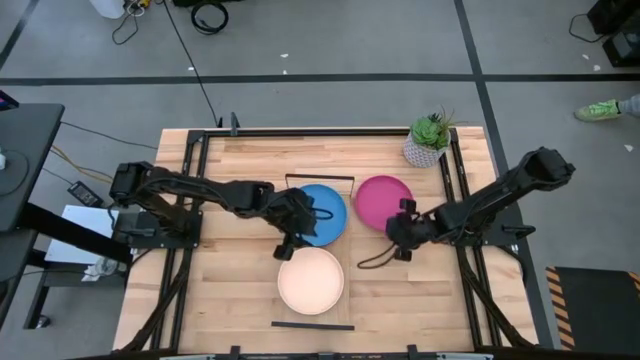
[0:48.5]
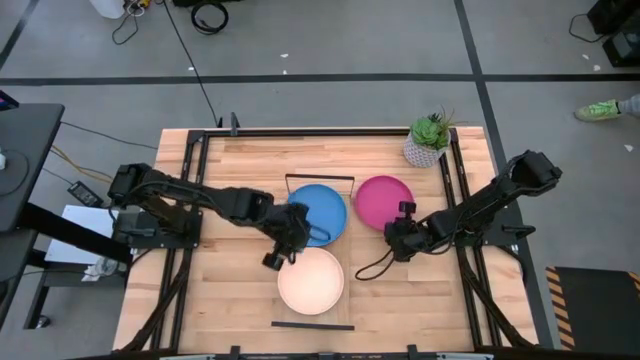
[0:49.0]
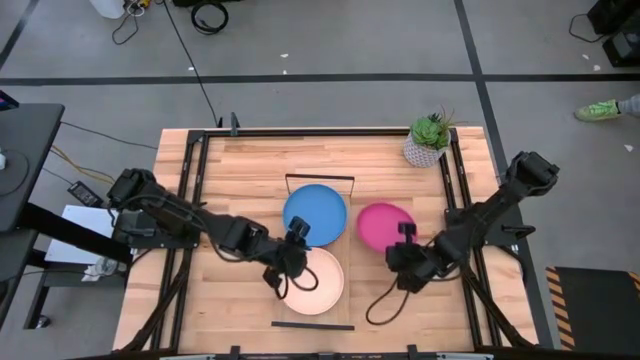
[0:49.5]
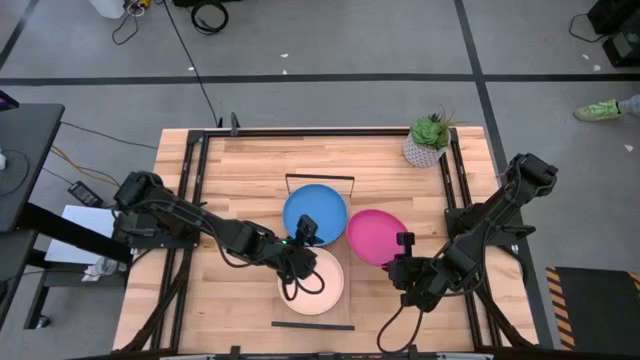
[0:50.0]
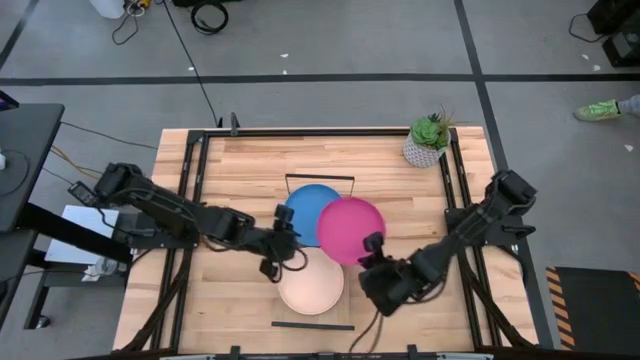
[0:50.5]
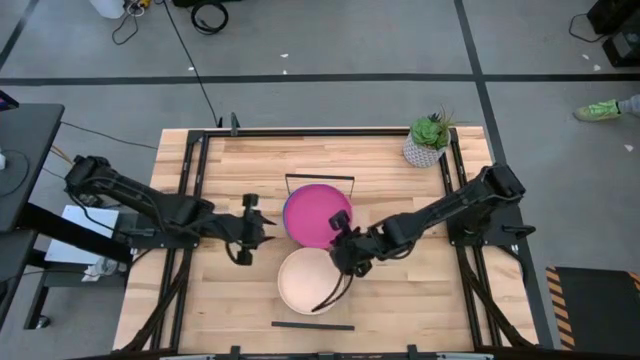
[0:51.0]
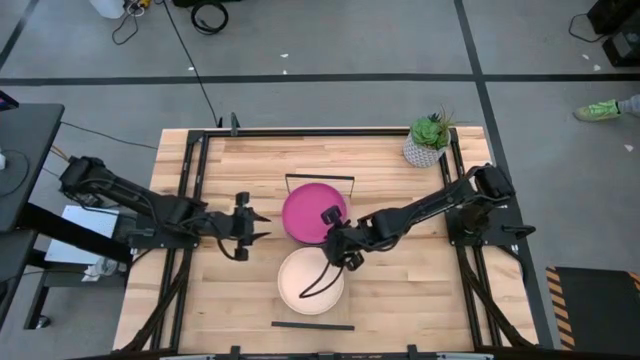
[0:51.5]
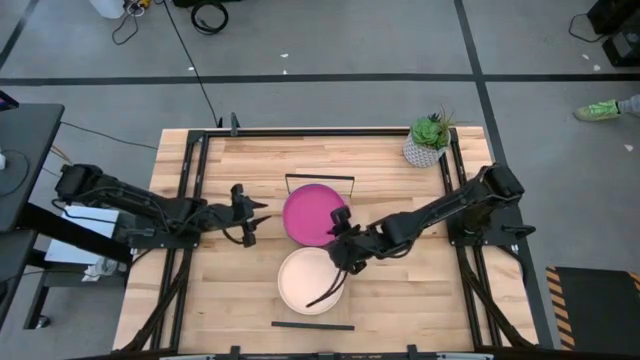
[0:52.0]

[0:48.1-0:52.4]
Task: Place and stack plates onto a shelf
Stack the pink plate on top of the light blue plate on the shelf

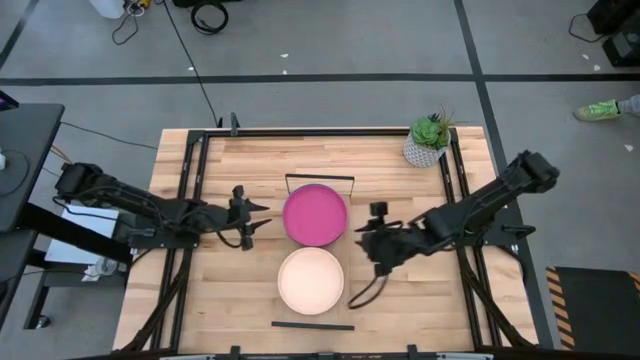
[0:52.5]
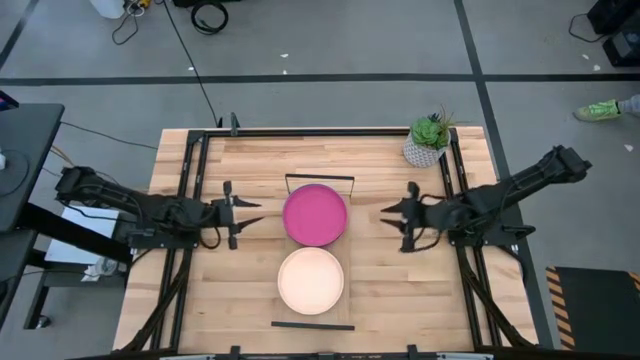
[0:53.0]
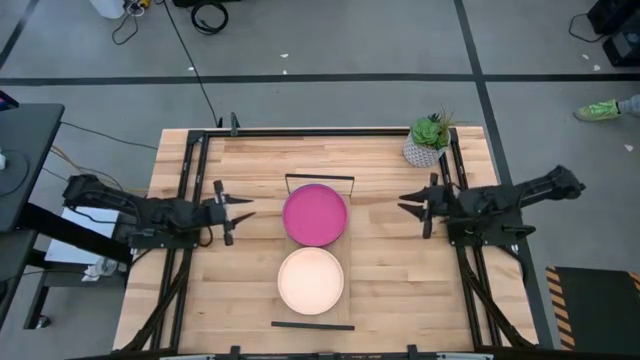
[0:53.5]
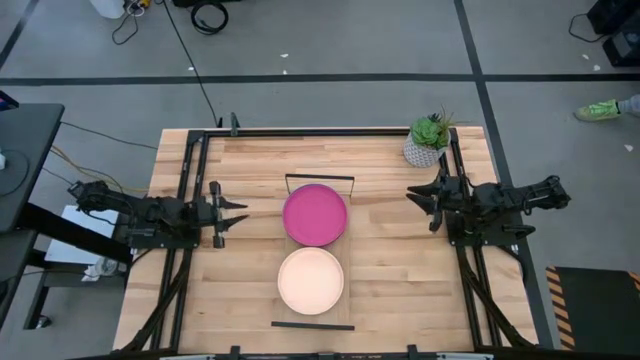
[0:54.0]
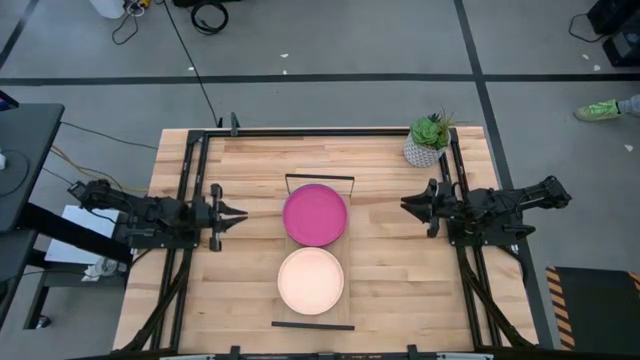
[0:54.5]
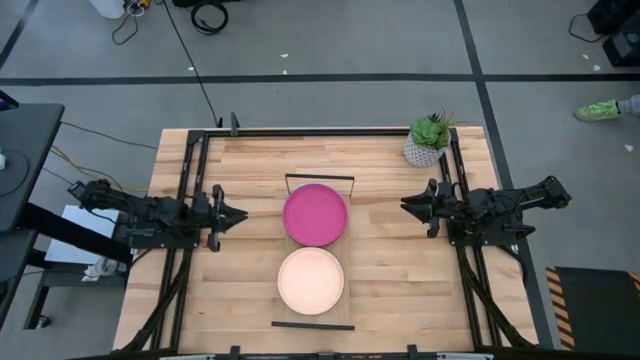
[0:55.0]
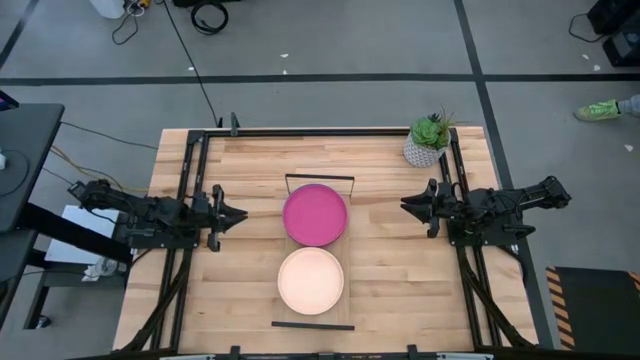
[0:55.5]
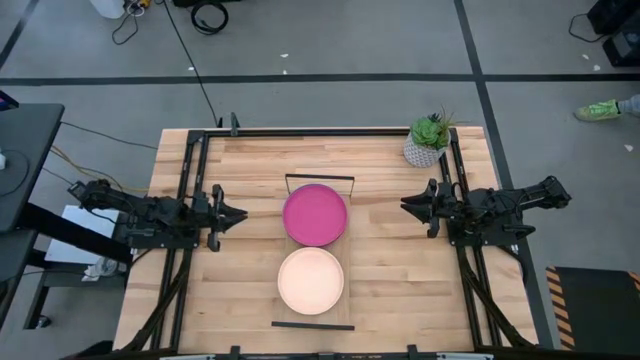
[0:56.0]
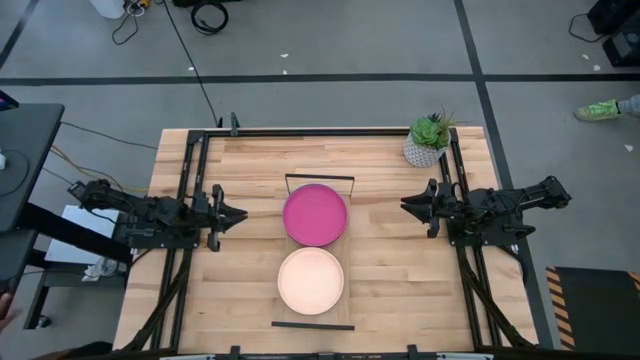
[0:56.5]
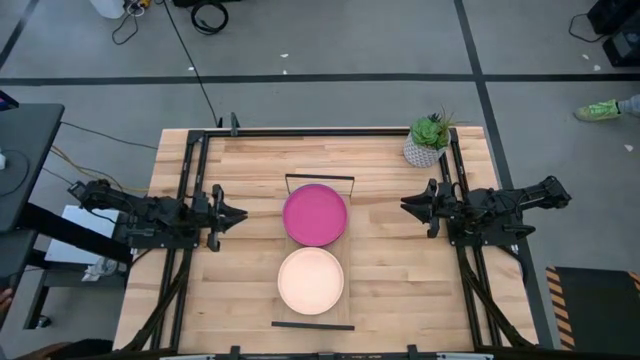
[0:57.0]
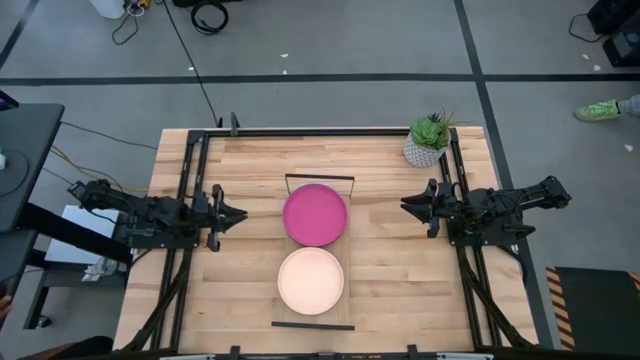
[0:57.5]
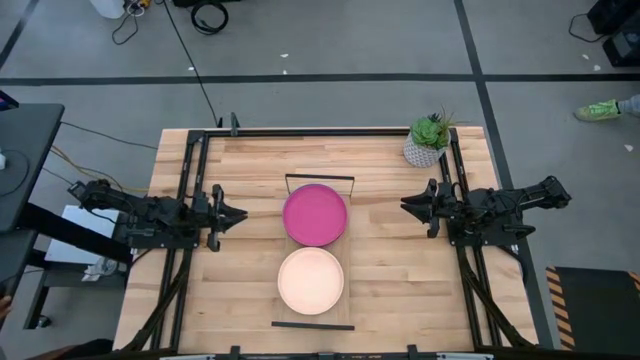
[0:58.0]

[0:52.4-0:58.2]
Return to Home Position

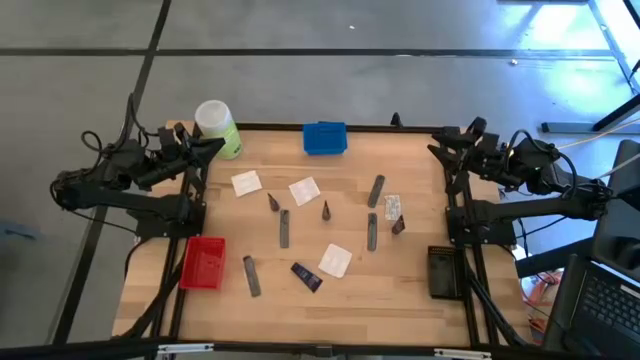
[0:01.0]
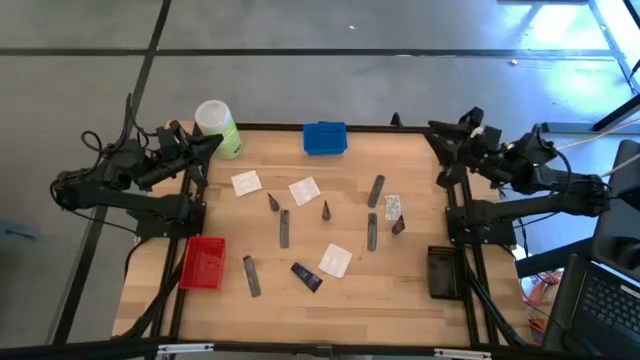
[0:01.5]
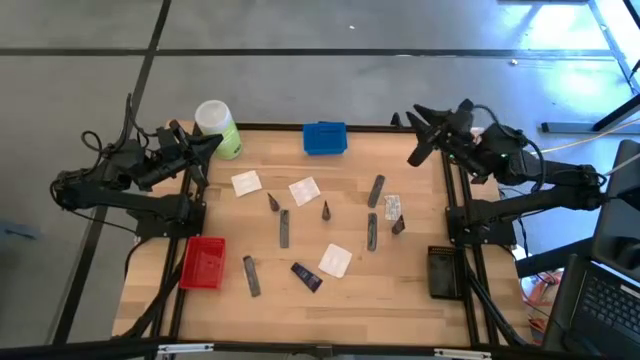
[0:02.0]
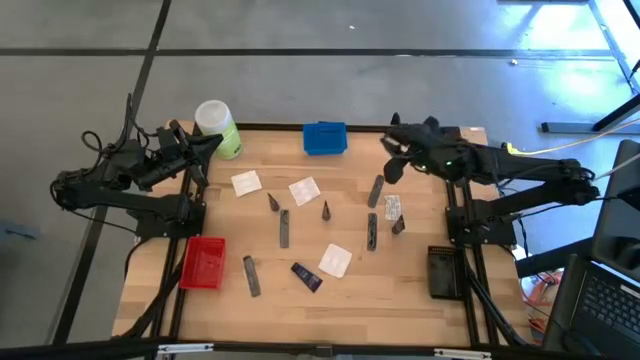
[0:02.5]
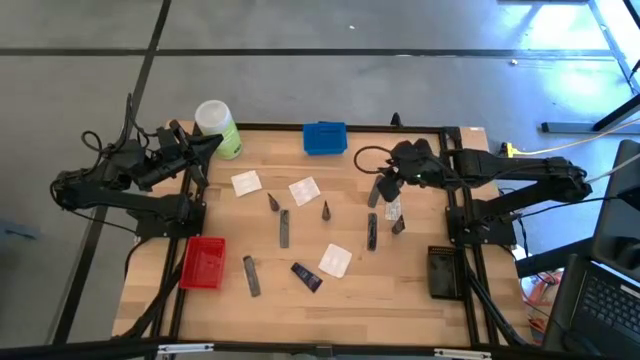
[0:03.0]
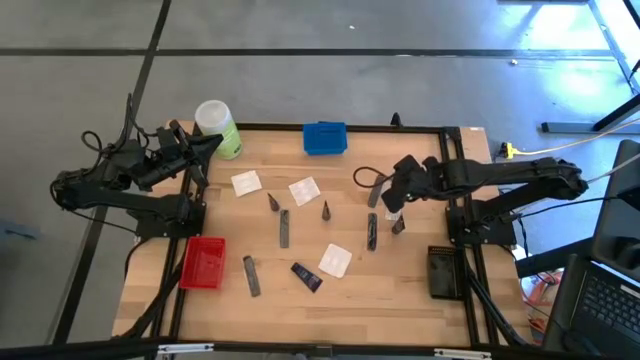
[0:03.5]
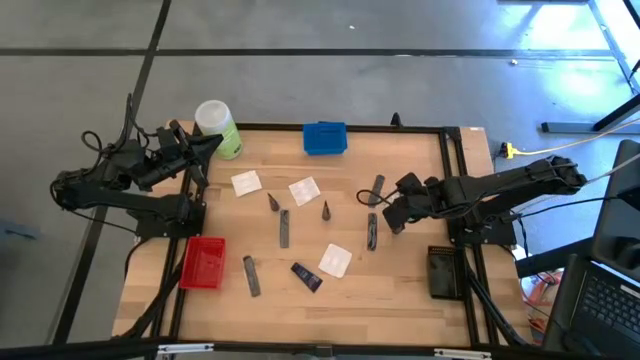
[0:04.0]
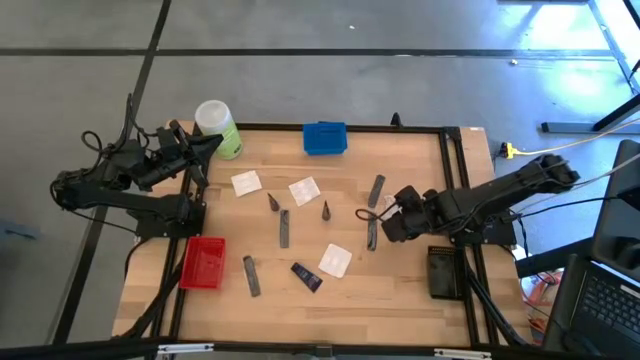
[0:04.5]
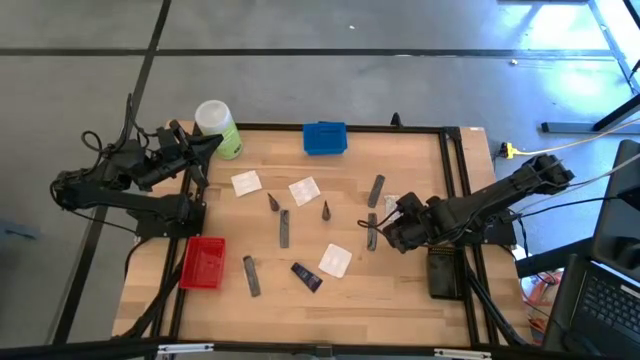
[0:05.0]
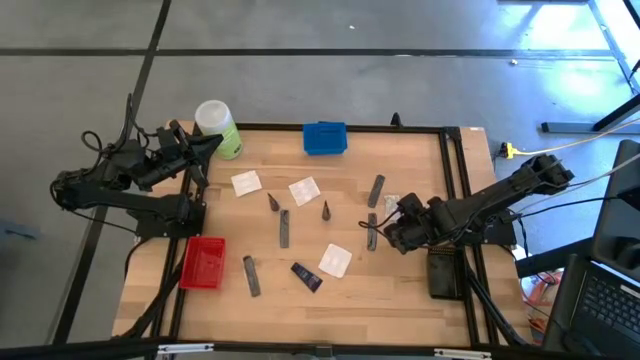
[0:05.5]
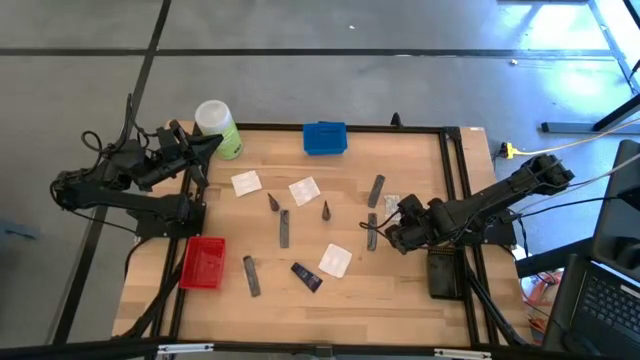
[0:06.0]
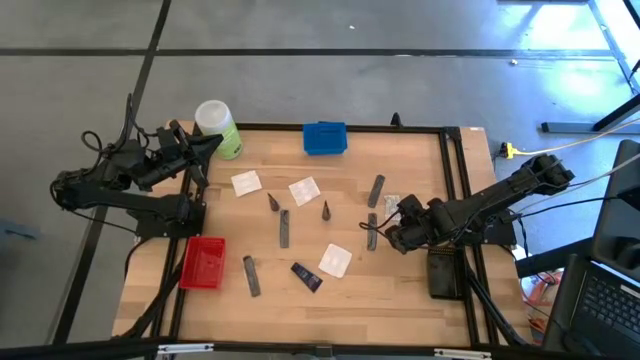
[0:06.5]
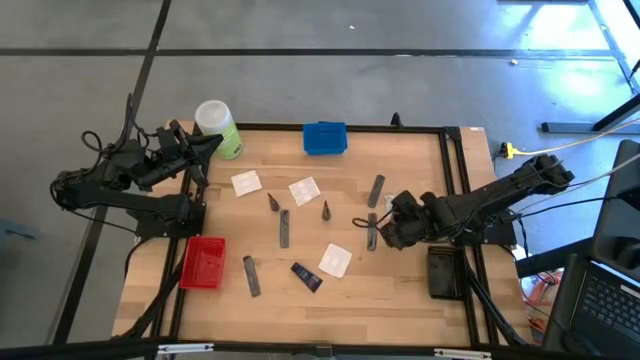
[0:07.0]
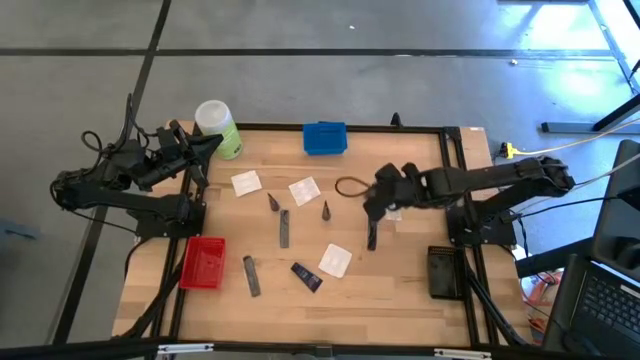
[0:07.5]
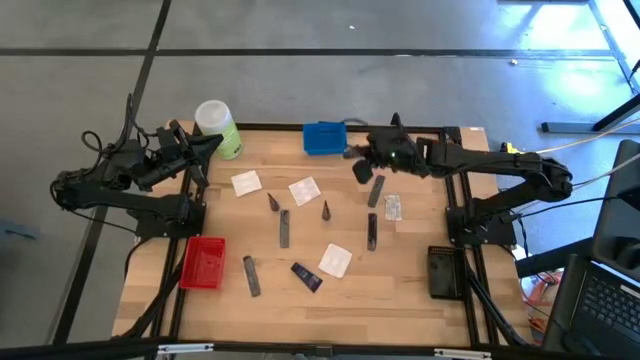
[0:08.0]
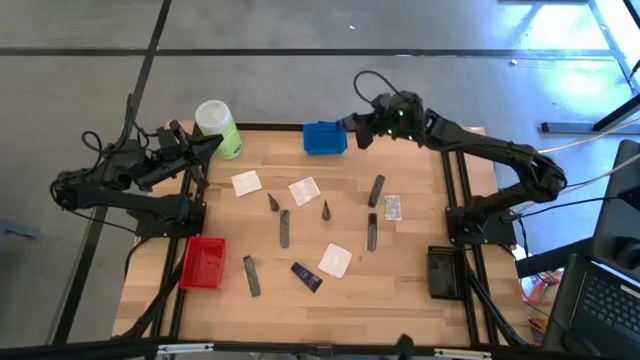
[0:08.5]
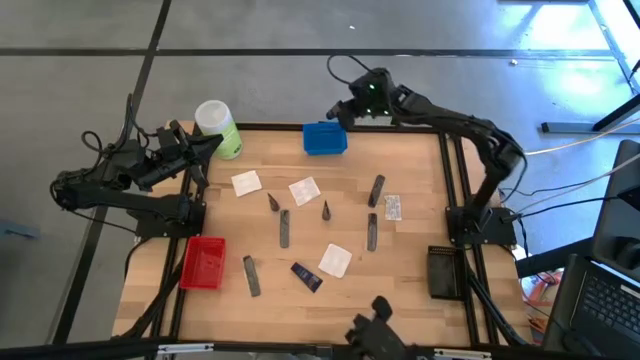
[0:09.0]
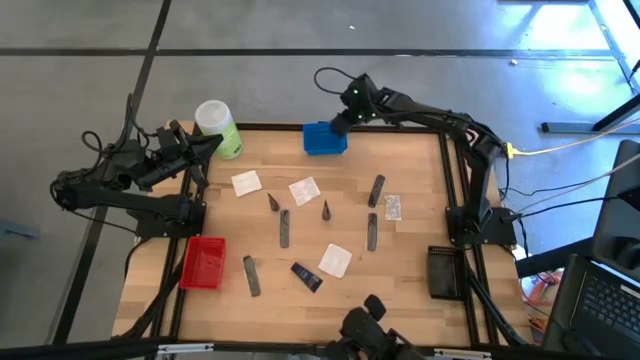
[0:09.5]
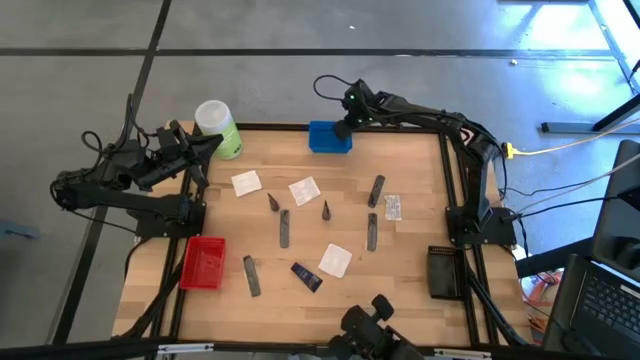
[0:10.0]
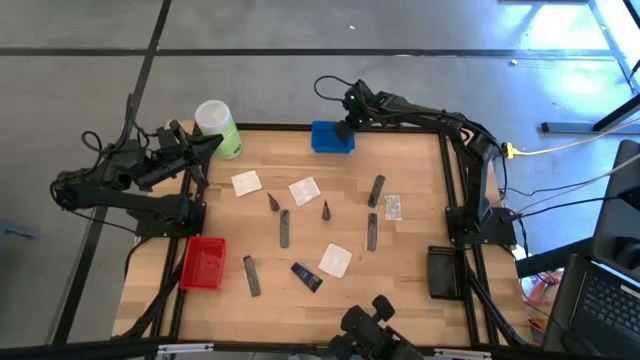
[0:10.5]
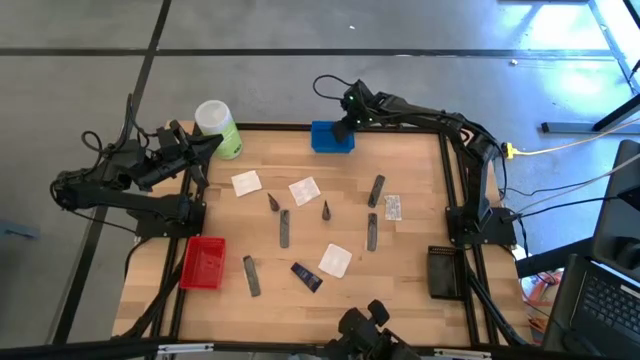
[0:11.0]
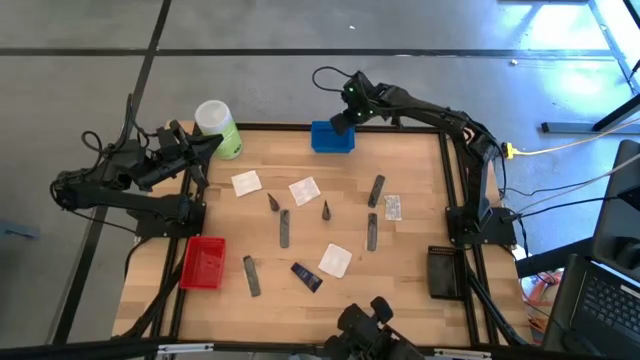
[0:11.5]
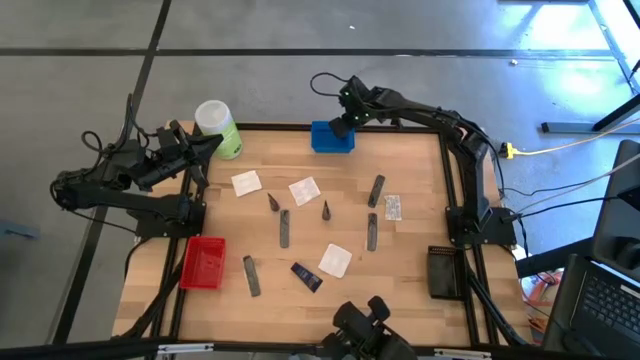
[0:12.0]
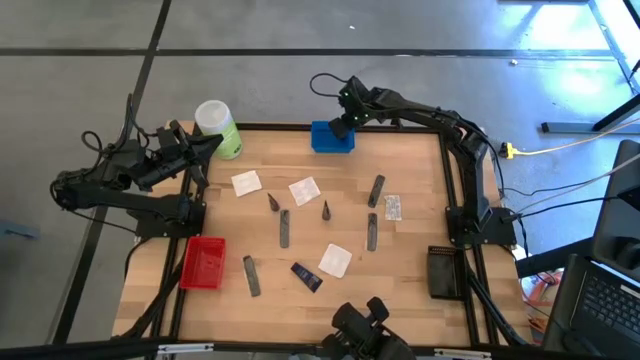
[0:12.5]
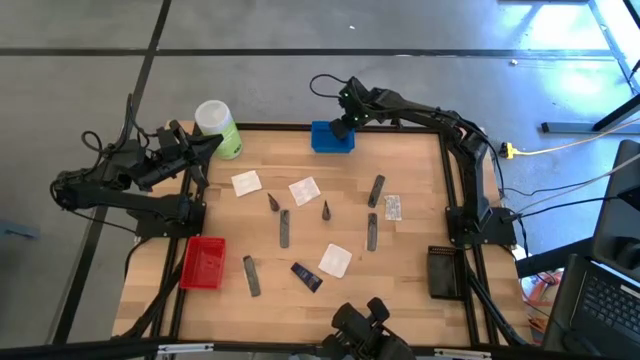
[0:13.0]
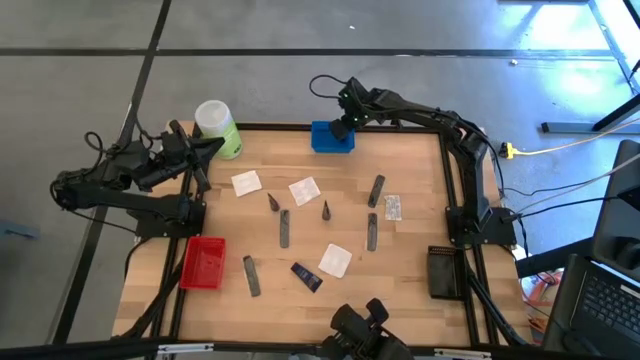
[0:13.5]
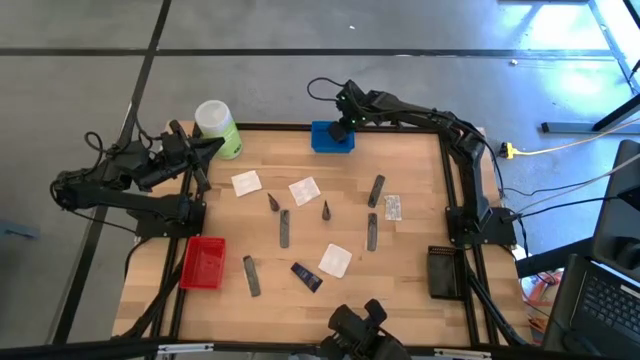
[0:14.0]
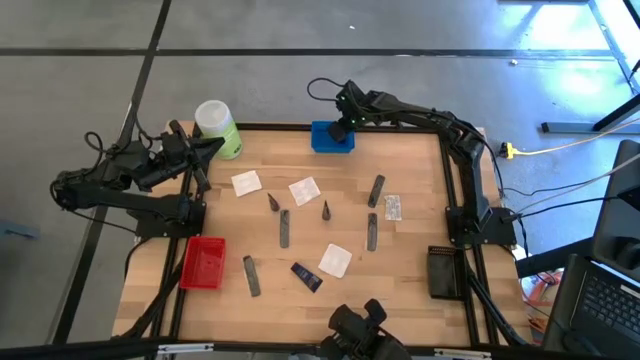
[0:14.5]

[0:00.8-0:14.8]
Task: Pick & Place Travel size toiletries
Put the blue shaving cream bottle into the blue basket
